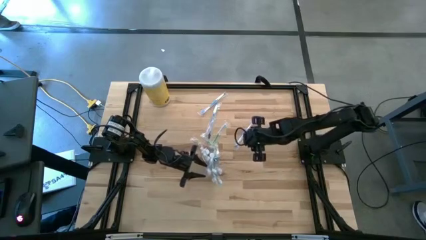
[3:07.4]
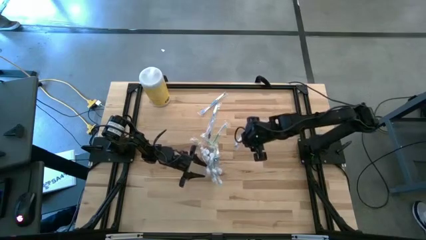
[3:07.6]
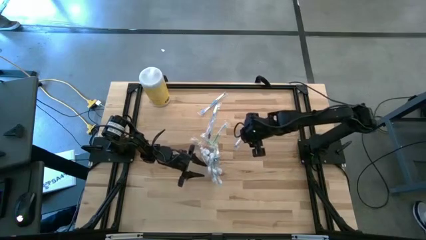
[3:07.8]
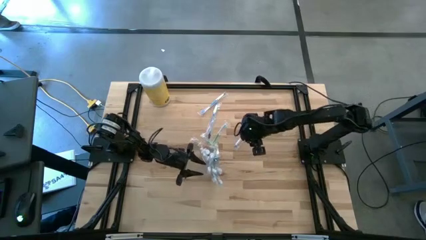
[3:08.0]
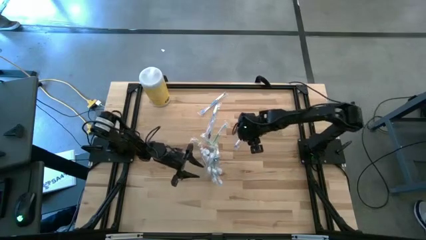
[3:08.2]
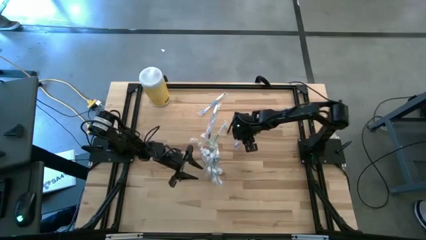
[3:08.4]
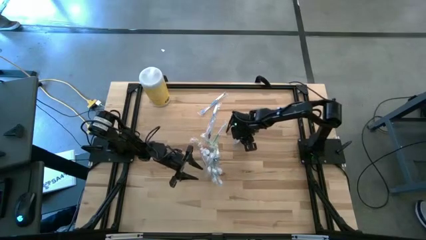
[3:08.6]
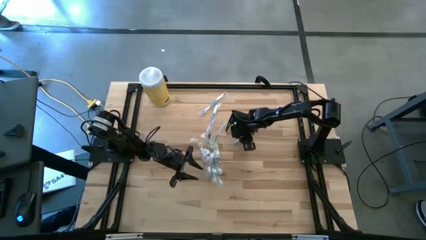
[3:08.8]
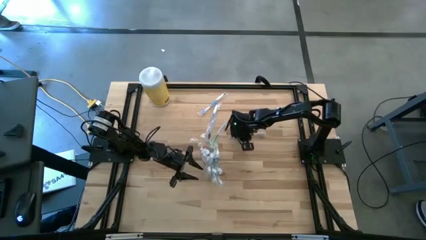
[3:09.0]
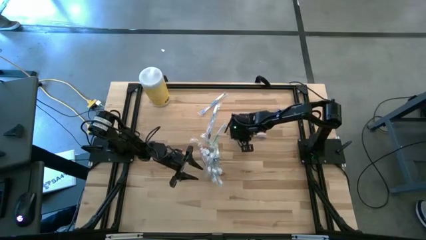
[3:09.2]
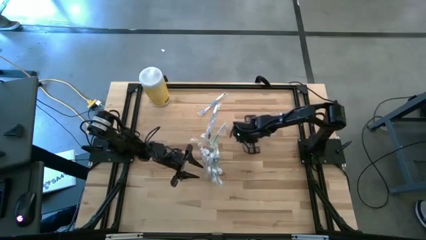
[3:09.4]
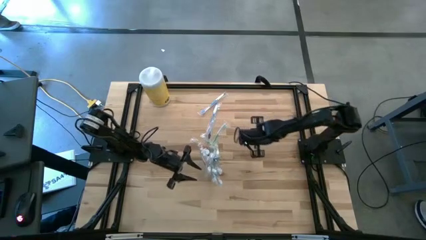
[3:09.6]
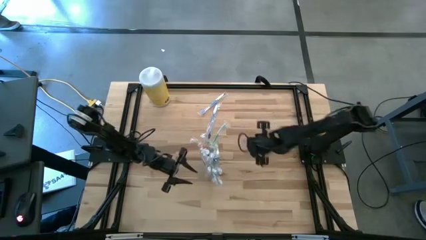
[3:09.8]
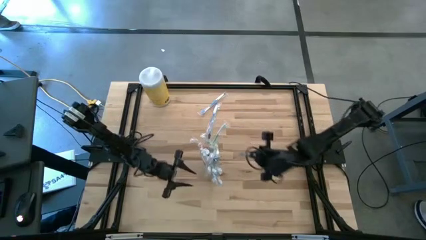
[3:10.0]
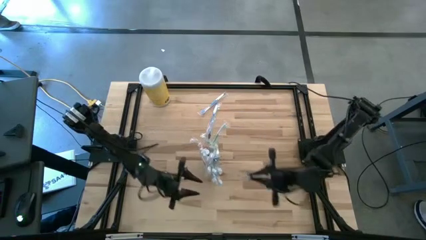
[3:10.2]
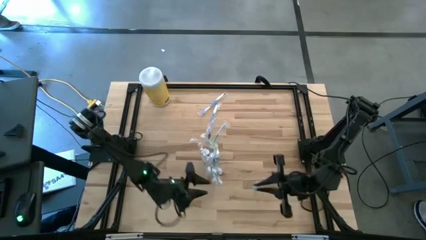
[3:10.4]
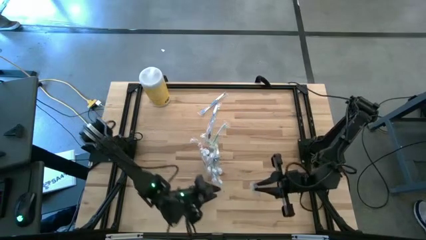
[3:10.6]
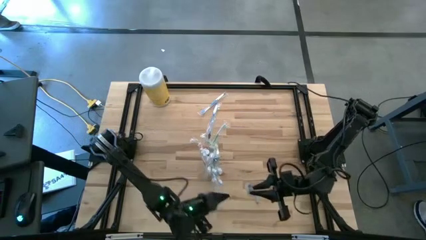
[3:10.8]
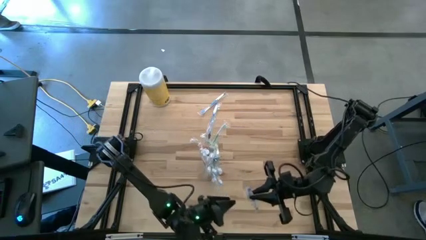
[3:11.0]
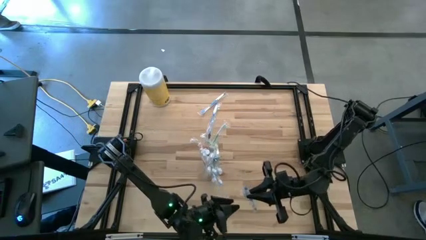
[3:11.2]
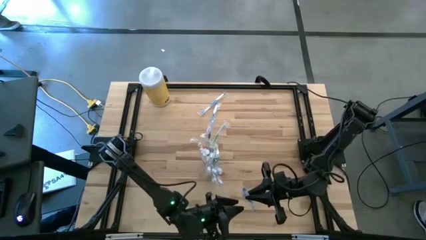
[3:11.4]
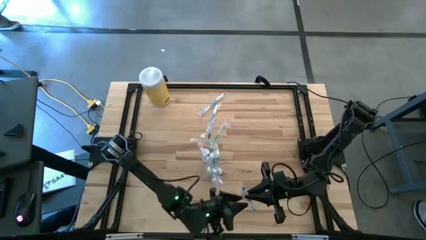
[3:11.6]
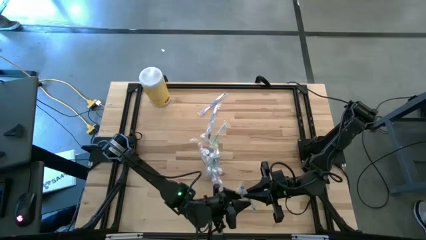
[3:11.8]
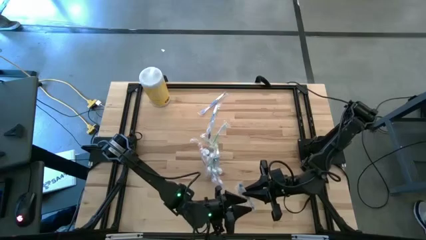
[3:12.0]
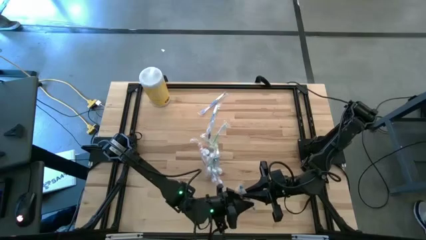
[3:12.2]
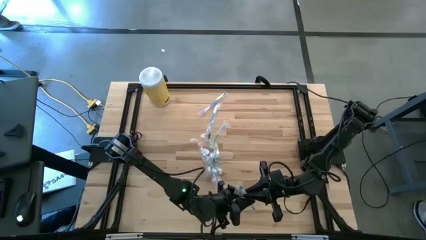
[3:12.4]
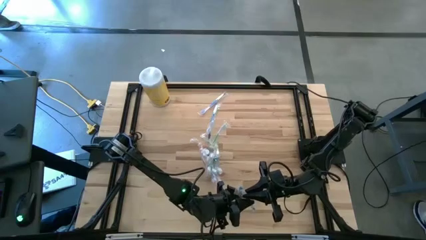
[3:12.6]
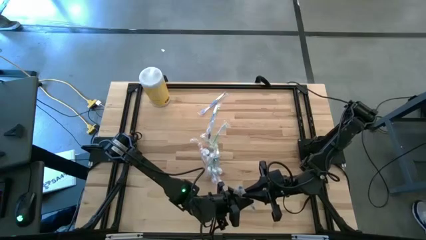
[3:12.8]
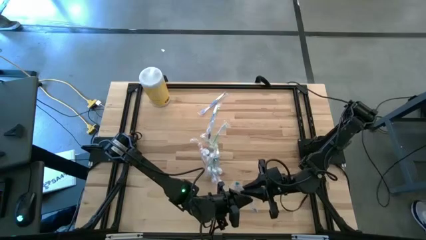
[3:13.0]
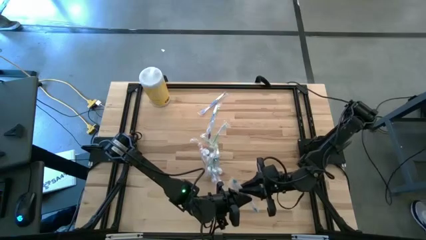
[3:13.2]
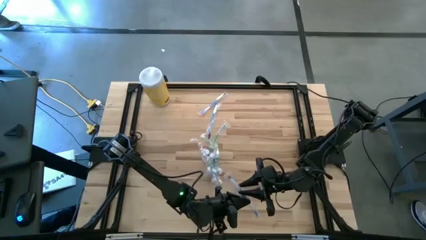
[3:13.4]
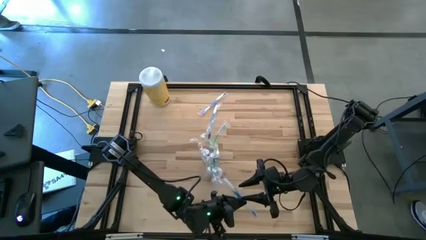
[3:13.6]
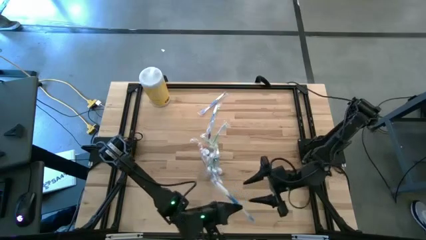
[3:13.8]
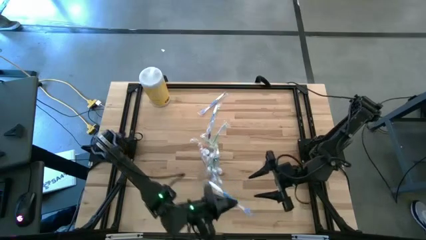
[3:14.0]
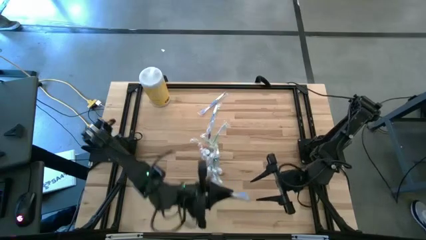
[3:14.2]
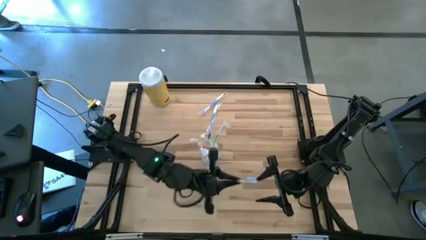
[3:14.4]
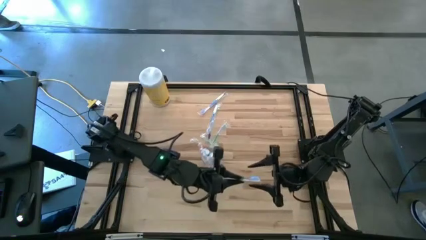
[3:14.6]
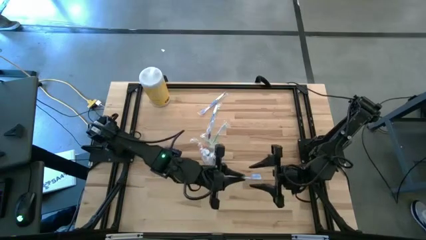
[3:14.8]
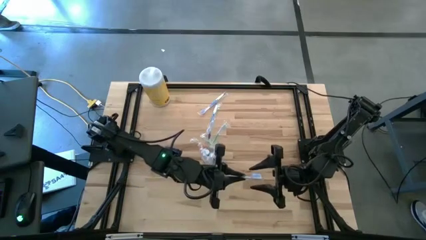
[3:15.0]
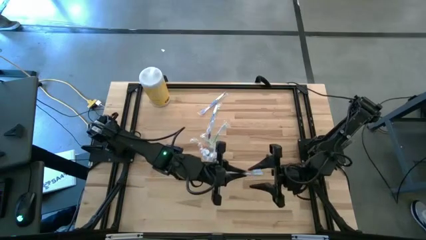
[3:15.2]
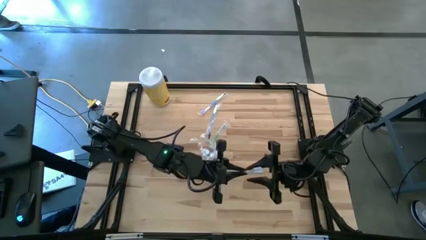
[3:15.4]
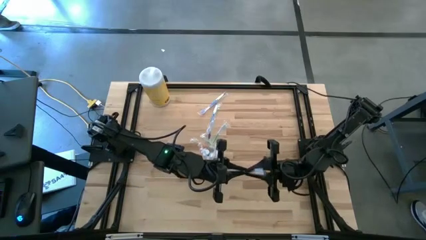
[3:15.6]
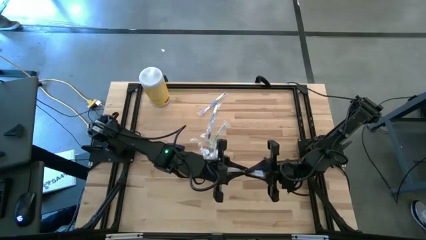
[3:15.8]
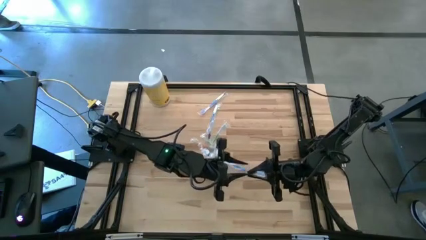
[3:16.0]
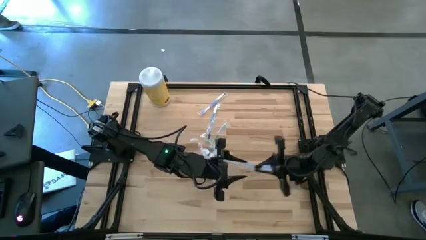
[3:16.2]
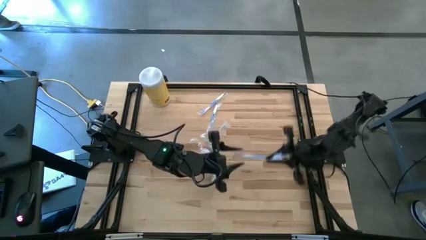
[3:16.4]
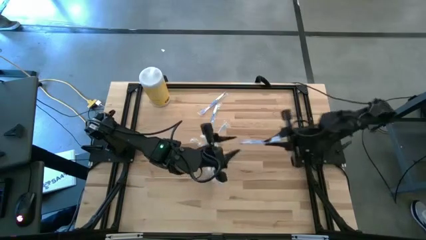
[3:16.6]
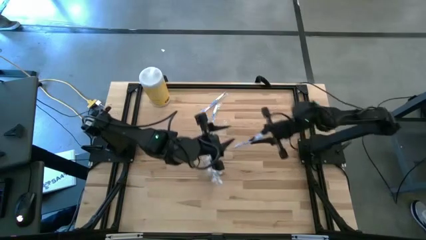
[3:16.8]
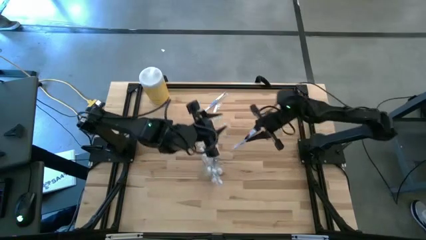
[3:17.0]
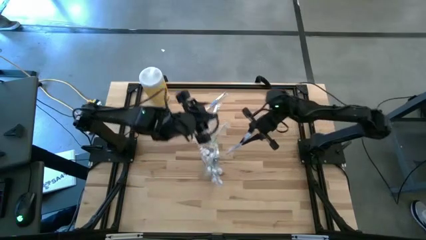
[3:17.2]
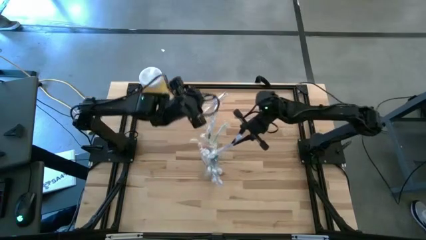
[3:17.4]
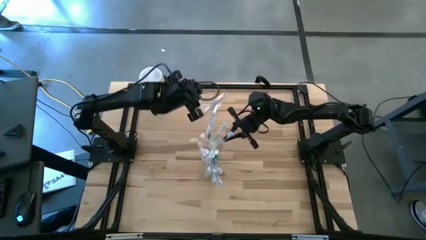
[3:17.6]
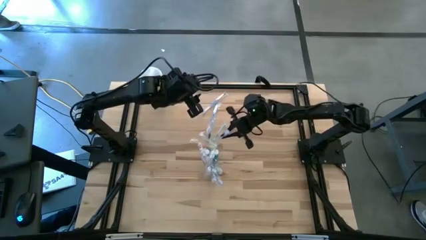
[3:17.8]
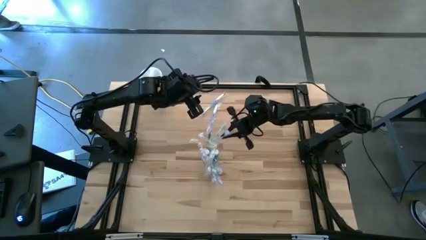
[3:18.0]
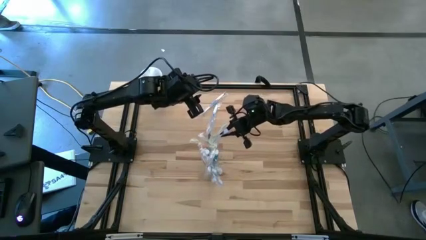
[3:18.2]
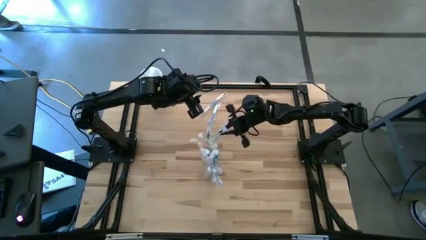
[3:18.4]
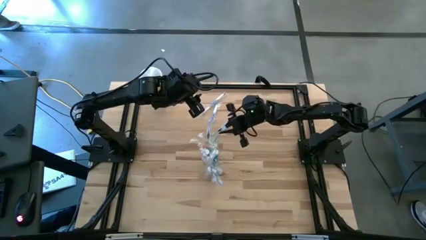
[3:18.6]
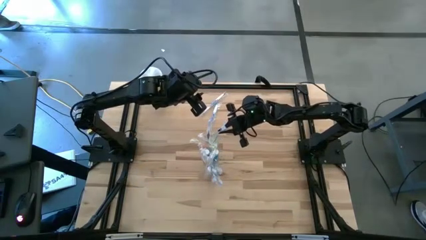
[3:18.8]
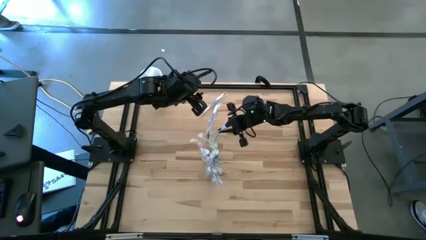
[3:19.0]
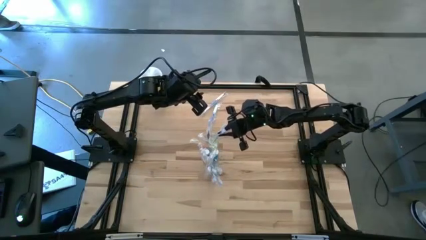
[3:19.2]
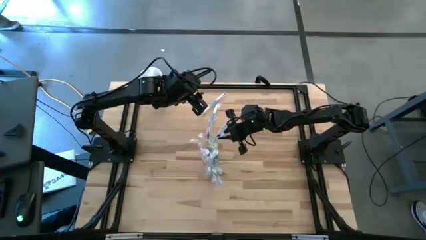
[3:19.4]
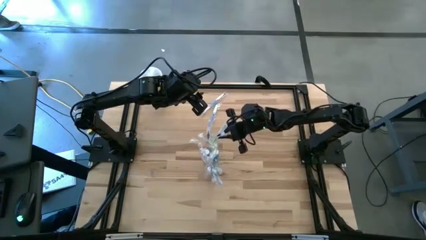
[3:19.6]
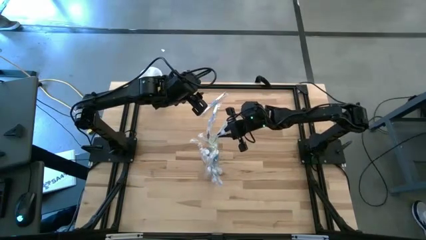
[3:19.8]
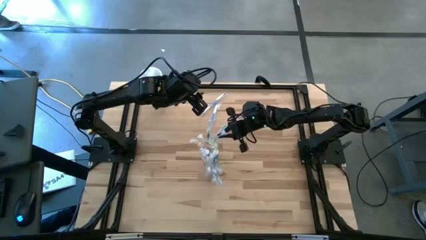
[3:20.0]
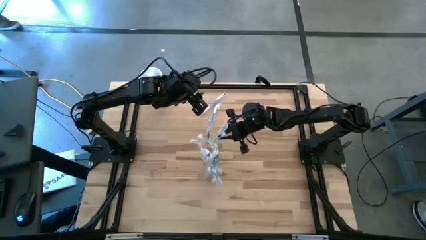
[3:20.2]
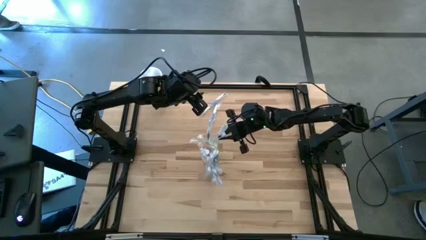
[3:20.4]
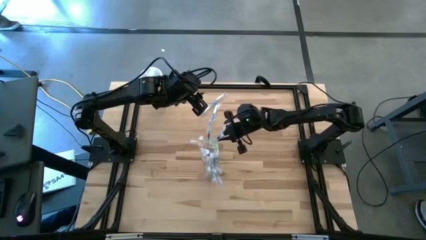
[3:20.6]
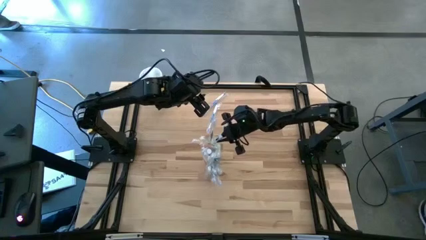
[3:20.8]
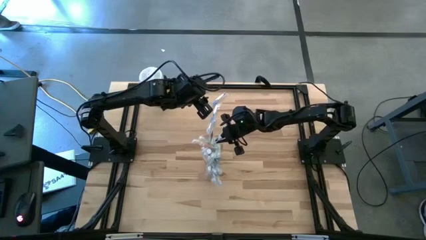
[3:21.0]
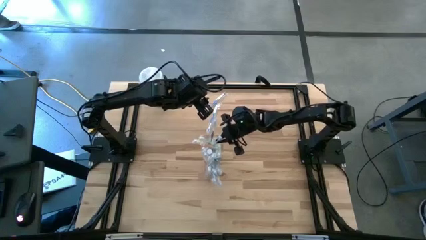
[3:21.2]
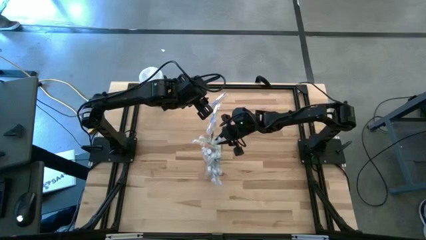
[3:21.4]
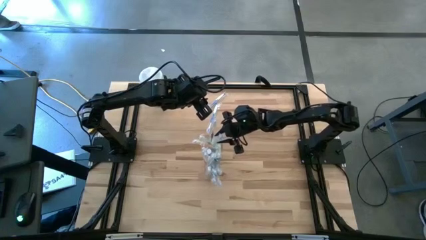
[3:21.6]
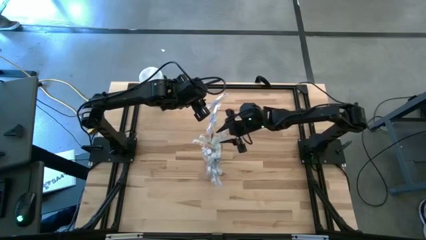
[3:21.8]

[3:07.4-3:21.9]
Task: Pick & Place toothbrushing station
Put the blue toothbrush into the transparent organizer
